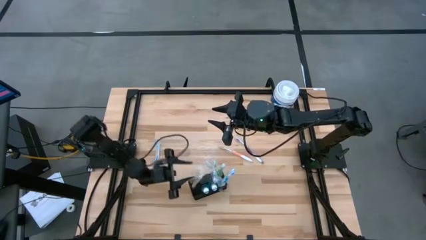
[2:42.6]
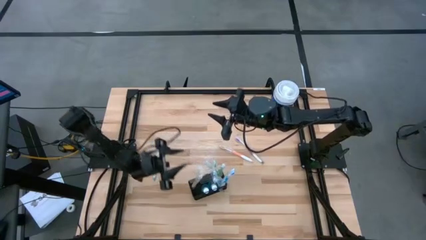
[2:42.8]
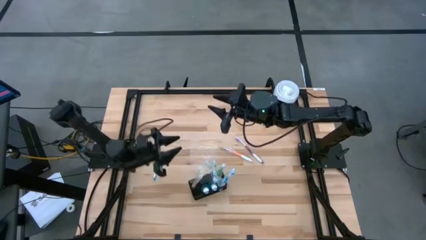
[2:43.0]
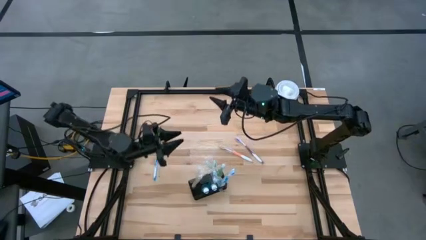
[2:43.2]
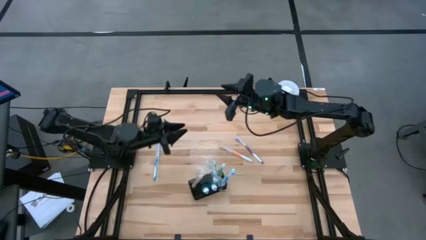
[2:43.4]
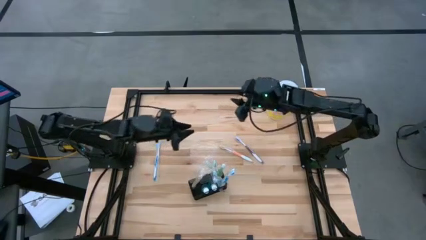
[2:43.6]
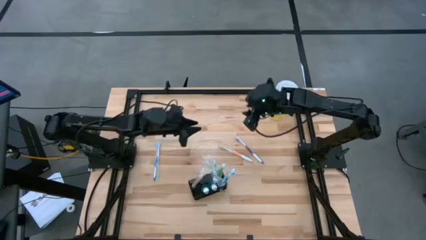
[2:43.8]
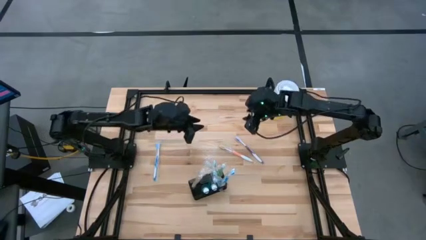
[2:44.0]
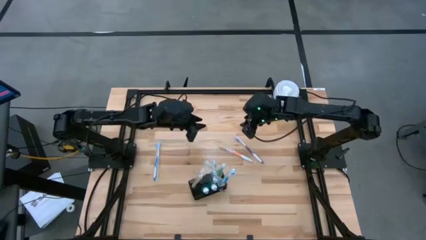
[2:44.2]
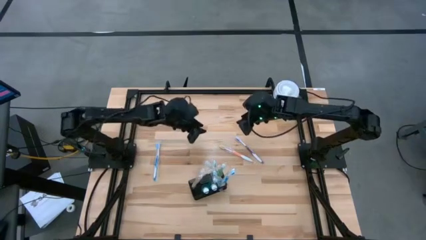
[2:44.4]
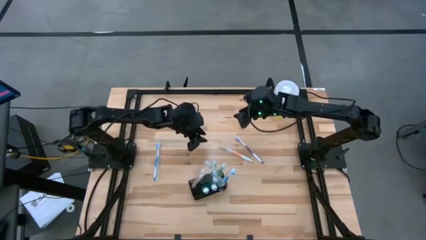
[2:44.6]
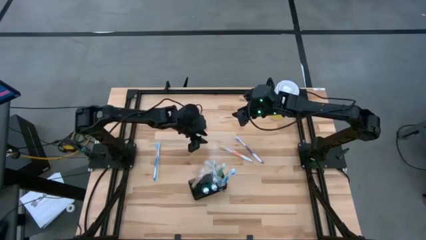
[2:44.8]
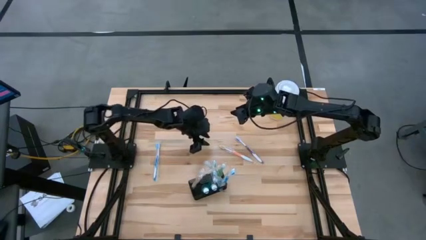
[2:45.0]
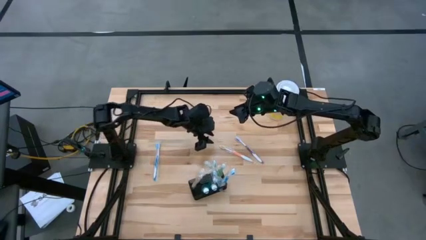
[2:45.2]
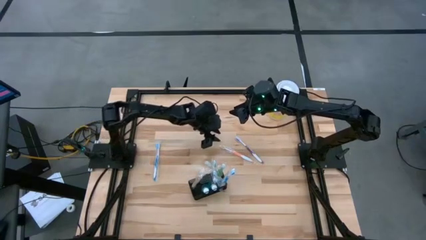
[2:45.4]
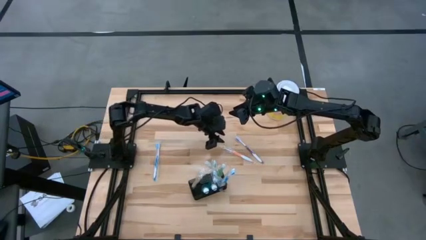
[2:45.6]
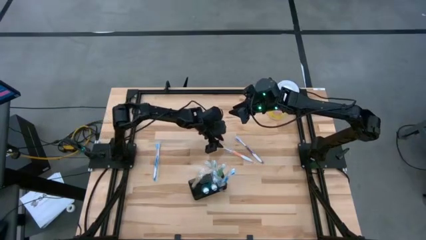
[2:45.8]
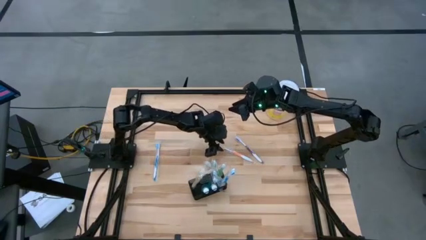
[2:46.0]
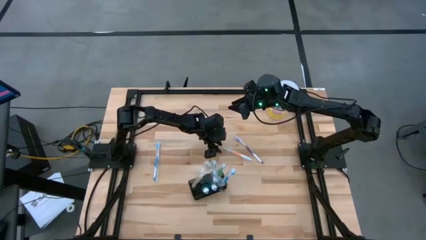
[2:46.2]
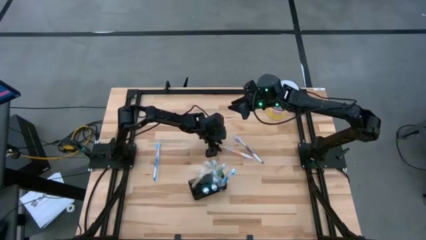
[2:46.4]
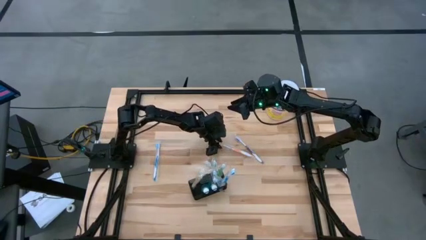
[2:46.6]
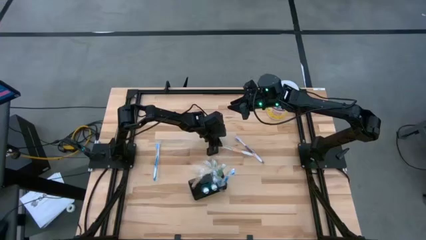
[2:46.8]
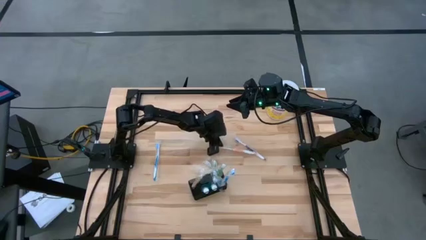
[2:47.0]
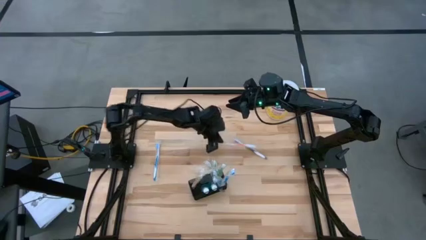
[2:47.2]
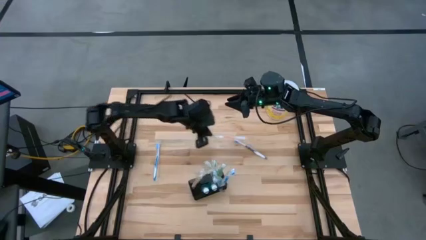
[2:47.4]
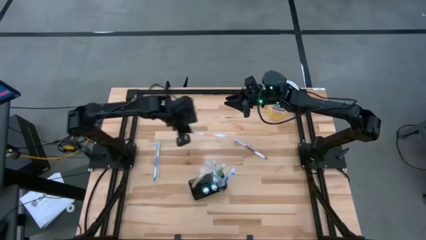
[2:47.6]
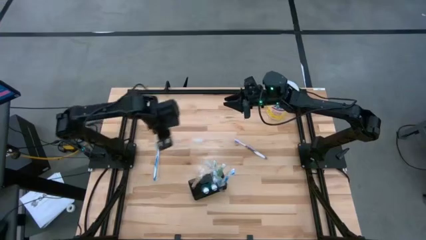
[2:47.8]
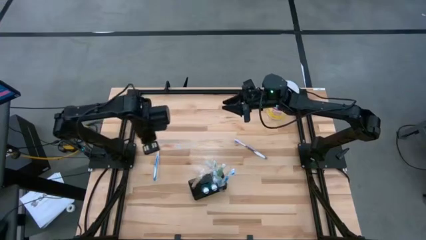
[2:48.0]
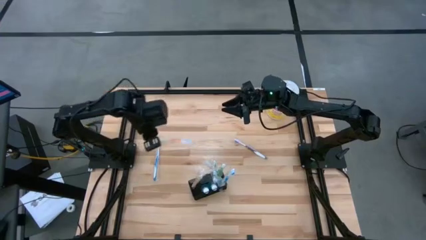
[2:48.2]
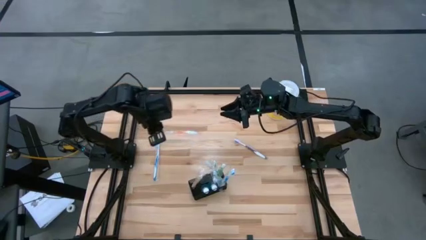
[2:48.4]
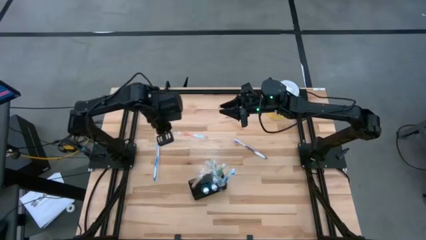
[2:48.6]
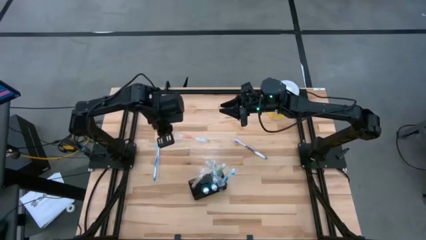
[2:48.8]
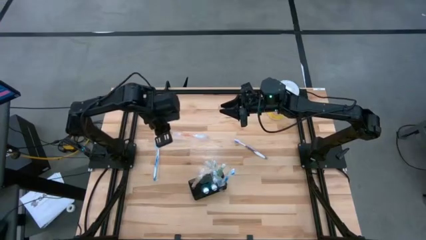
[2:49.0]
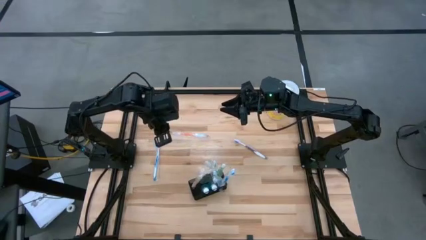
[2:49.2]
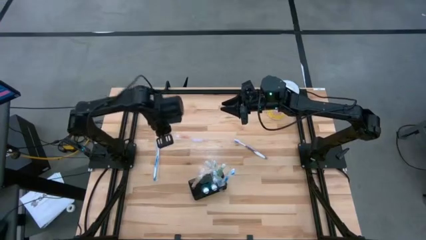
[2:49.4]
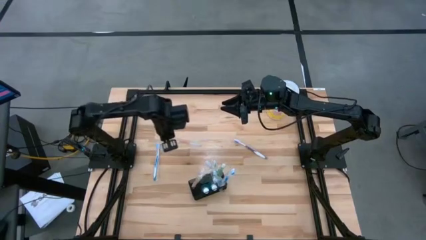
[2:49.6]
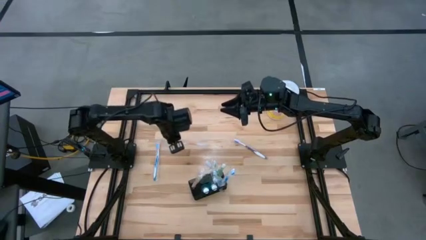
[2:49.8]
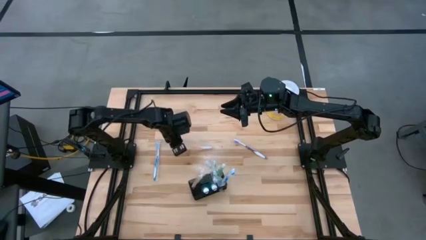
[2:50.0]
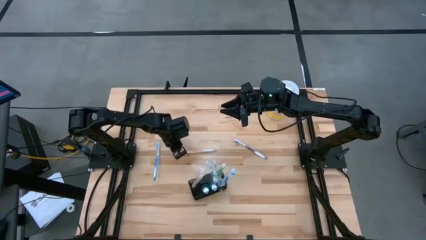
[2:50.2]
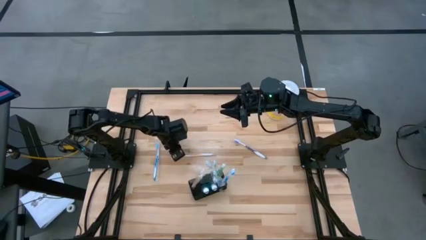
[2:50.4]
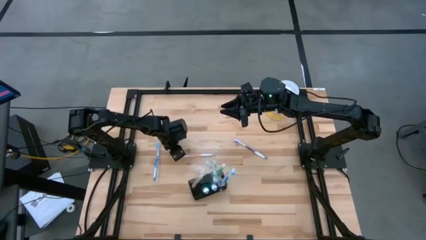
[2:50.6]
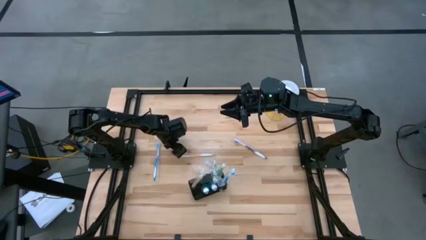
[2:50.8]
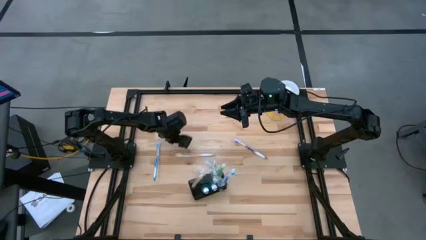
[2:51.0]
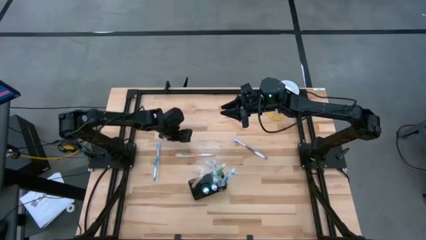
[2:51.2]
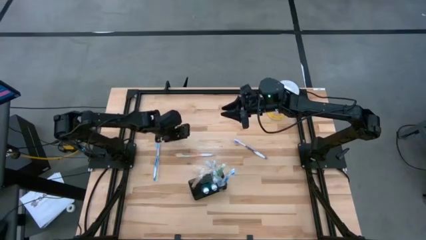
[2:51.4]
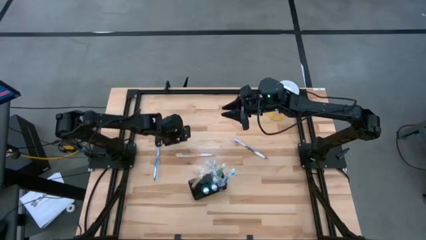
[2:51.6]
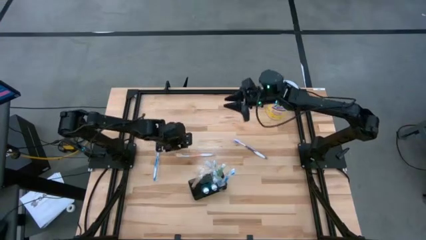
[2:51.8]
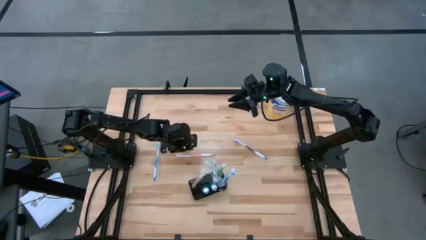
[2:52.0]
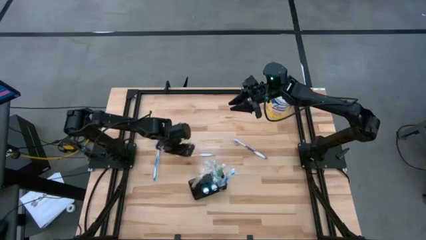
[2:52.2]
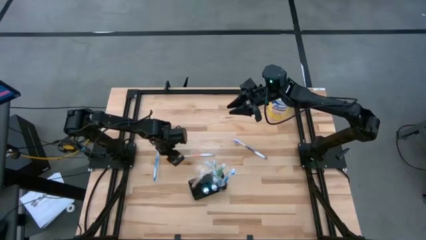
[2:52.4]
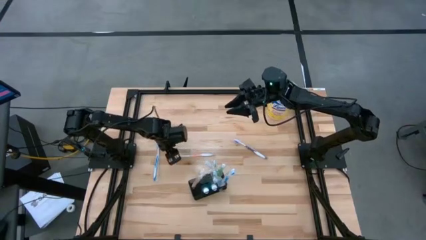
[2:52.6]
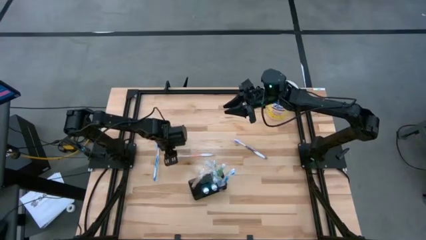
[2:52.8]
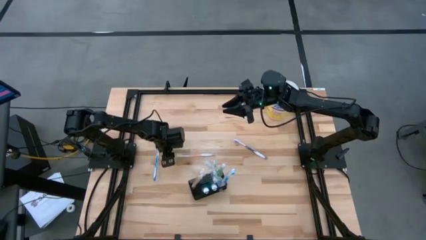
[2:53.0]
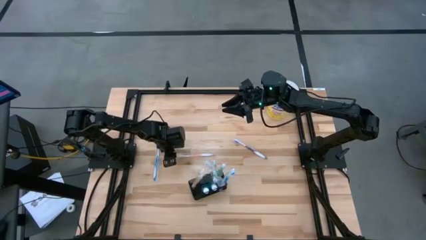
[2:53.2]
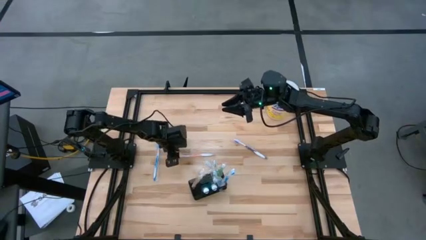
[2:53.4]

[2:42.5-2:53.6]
Task: Pick & Place toothbrushing station
Put the orange toothbrush into the mesh organizer

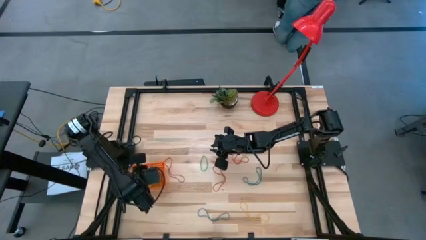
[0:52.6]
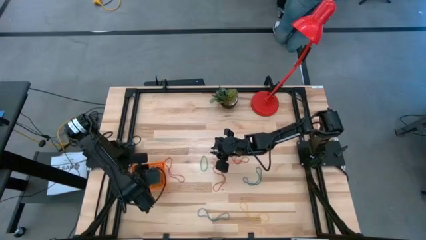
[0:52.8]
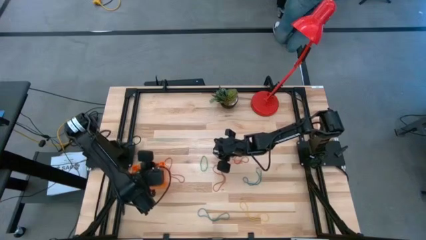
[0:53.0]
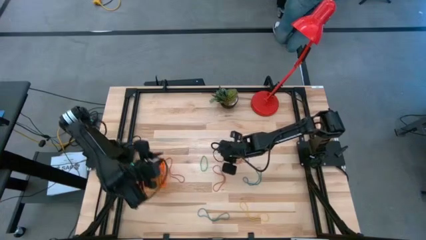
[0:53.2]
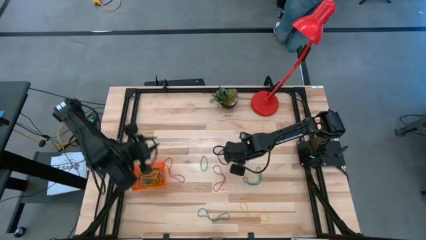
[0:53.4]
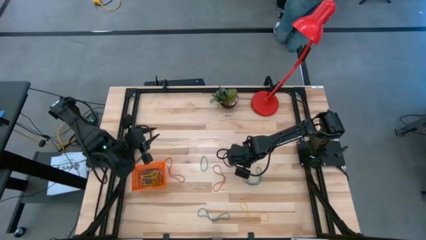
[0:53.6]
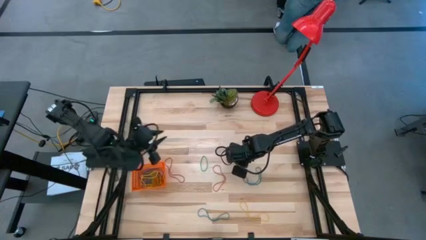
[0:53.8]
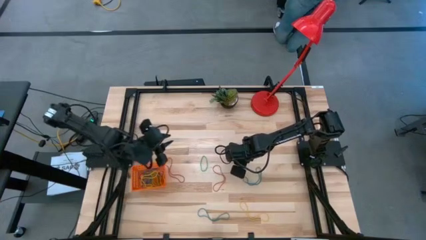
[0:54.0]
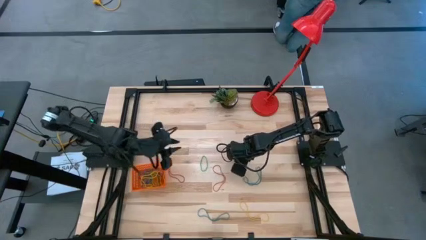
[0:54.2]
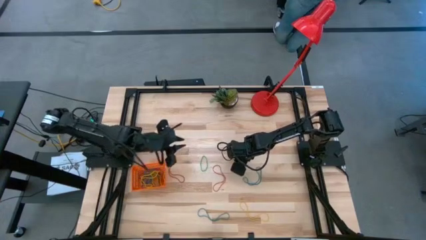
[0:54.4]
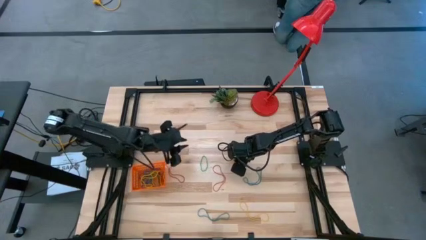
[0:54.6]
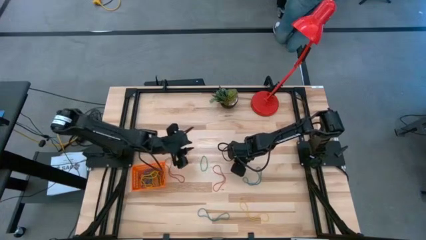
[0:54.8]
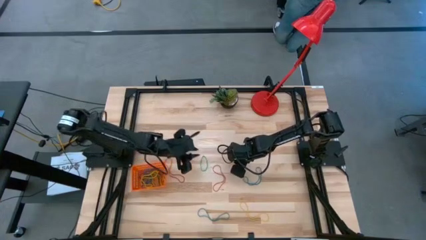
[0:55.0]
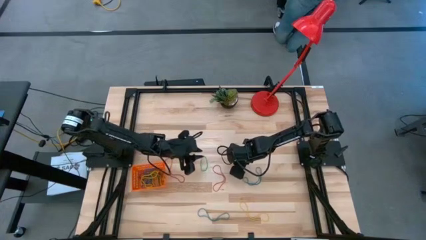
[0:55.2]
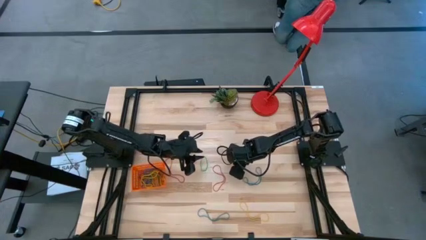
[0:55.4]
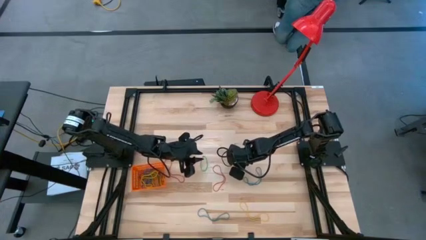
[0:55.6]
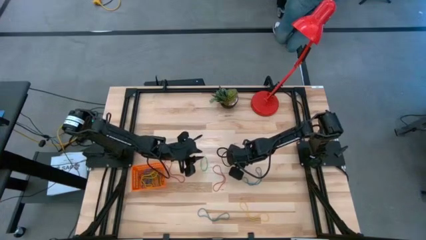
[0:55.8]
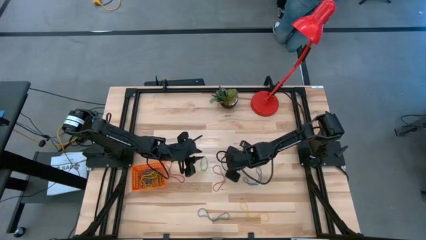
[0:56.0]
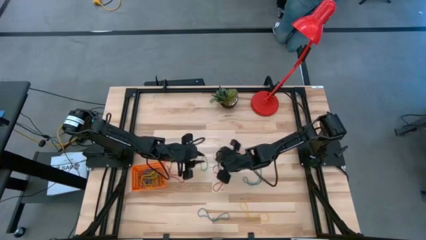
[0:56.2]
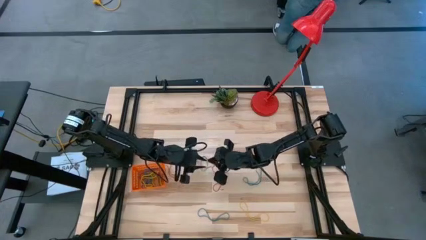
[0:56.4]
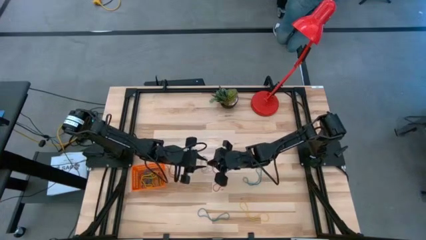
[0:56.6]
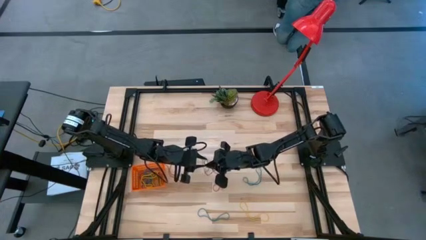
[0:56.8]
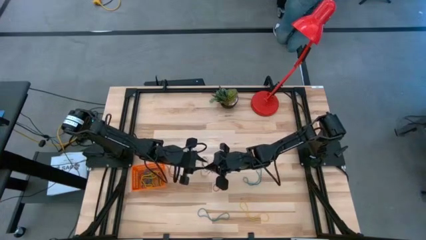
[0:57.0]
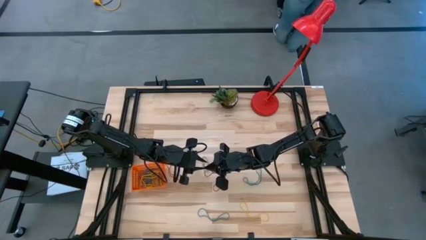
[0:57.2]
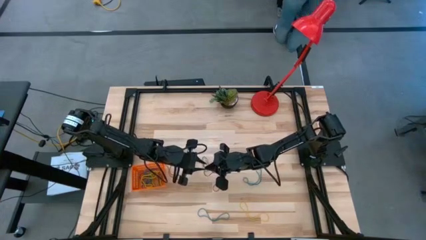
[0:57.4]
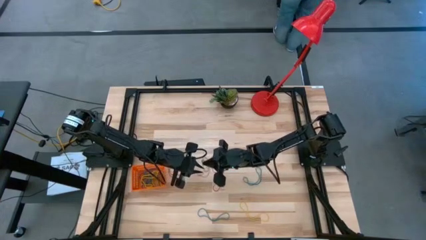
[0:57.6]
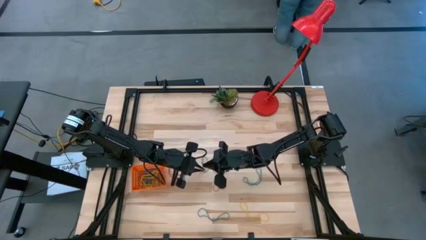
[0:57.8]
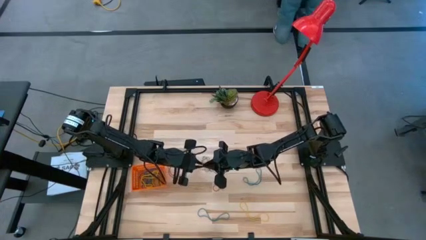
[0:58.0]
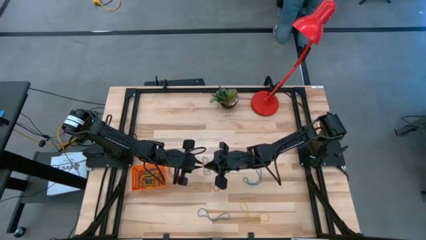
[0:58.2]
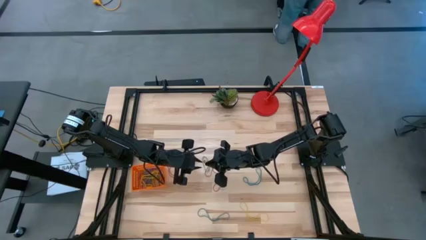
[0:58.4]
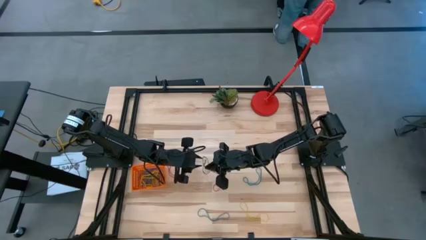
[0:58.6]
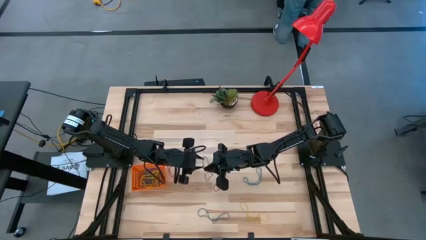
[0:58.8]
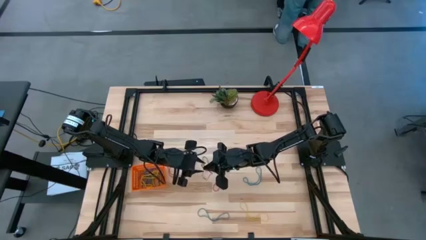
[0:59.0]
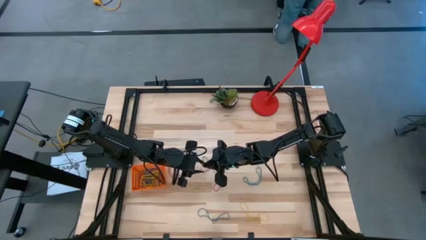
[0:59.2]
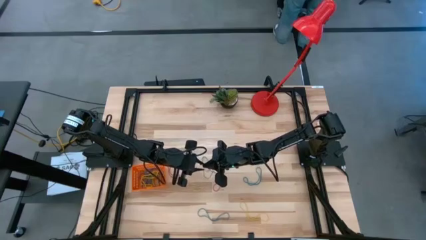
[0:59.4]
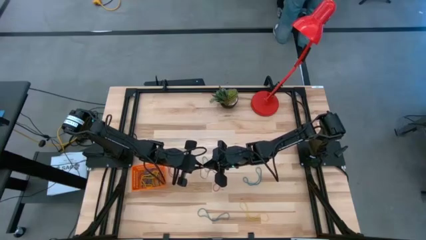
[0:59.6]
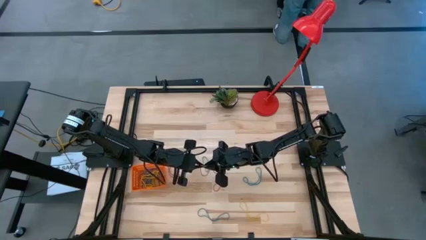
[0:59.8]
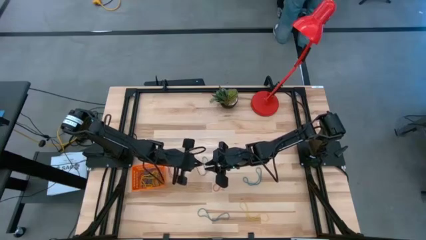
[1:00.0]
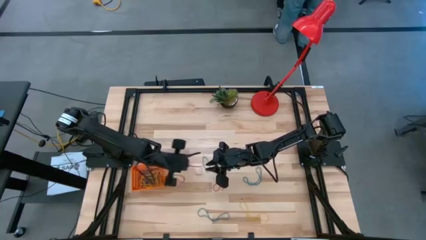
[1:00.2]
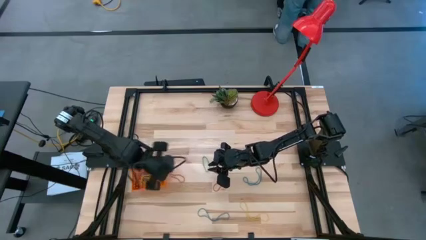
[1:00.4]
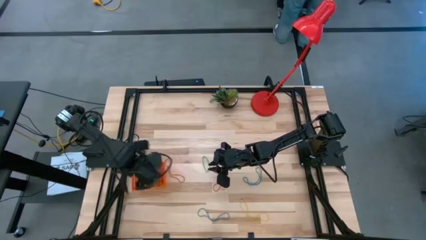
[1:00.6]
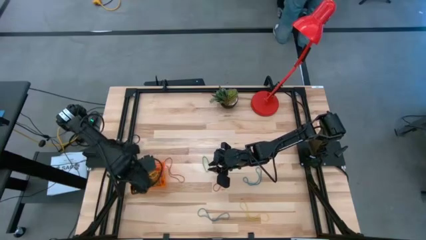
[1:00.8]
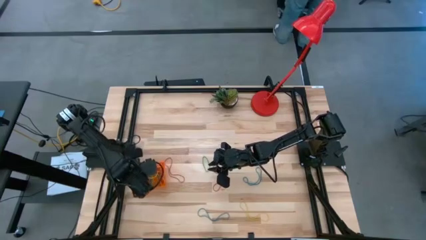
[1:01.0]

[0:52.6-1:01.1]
Task: Pick and place rubber bands into bin
Put the red rubber band into the orange basket
